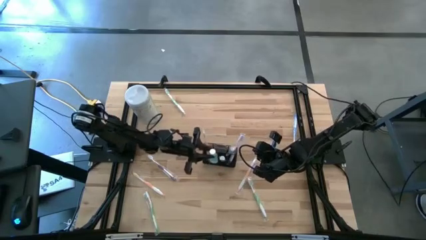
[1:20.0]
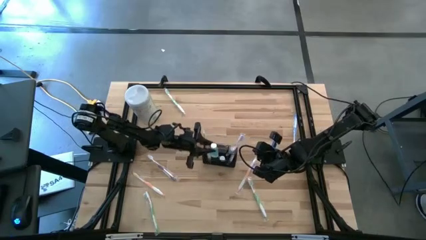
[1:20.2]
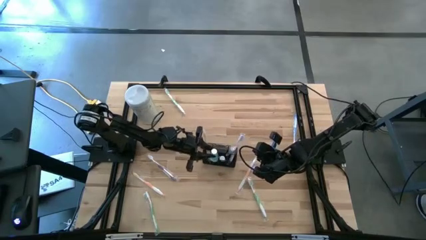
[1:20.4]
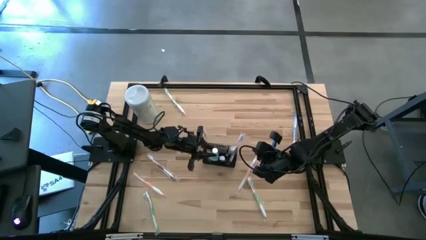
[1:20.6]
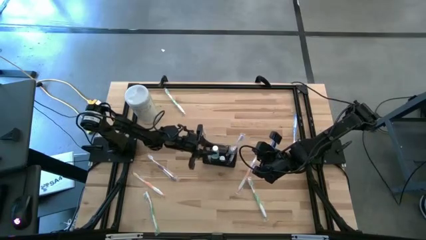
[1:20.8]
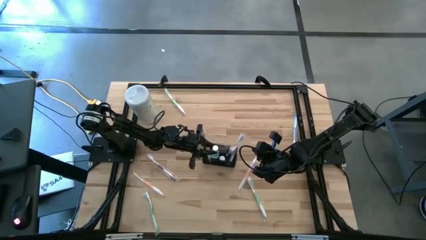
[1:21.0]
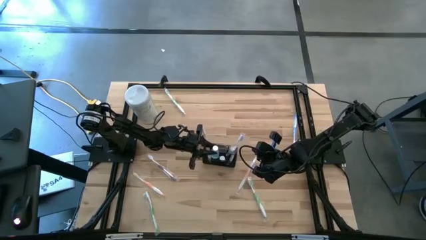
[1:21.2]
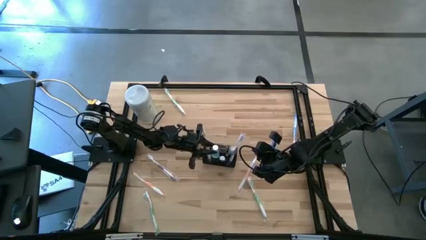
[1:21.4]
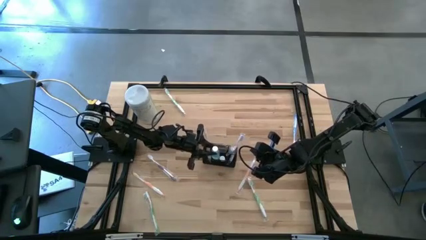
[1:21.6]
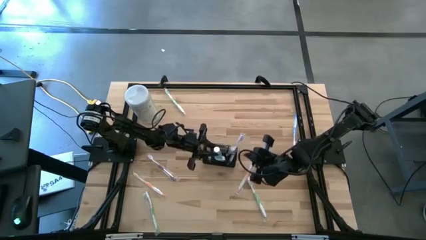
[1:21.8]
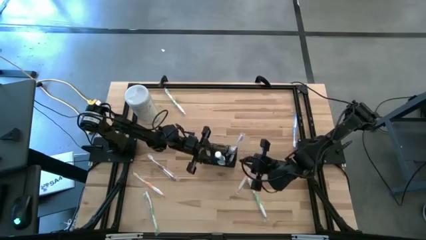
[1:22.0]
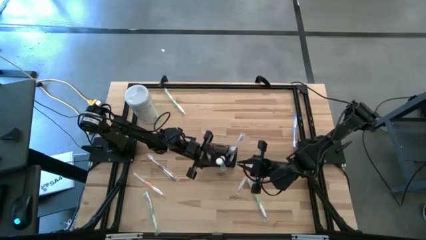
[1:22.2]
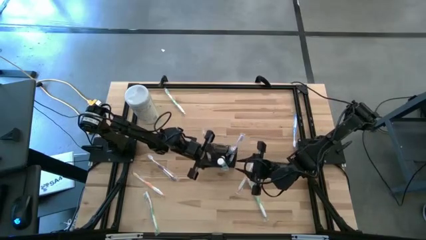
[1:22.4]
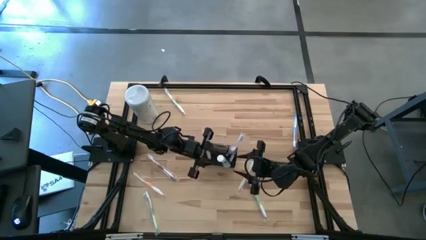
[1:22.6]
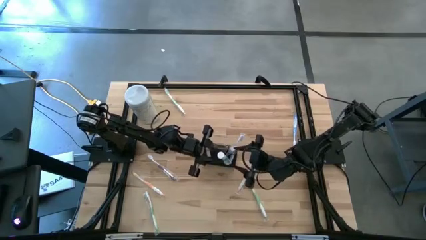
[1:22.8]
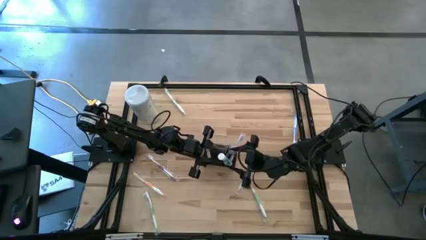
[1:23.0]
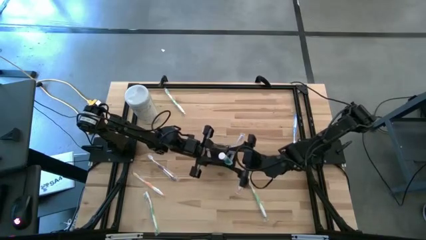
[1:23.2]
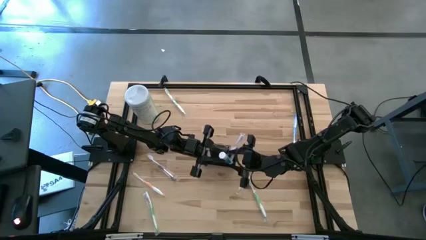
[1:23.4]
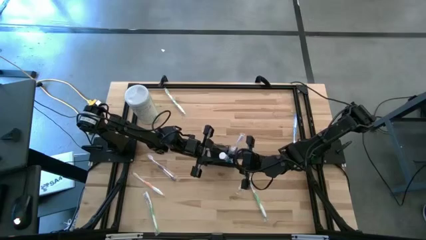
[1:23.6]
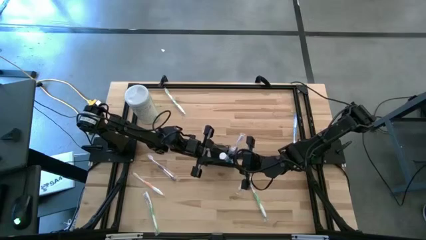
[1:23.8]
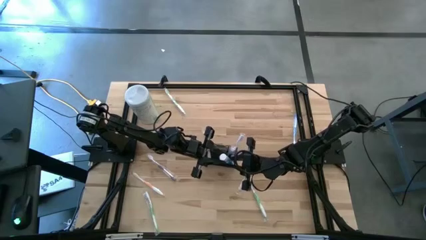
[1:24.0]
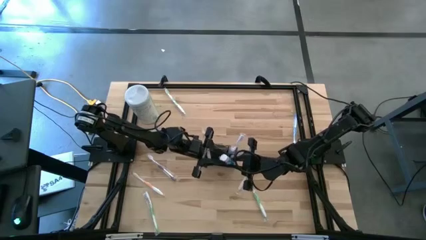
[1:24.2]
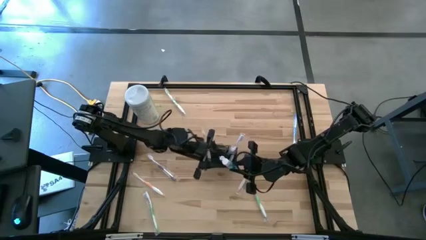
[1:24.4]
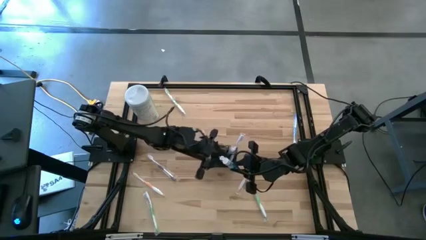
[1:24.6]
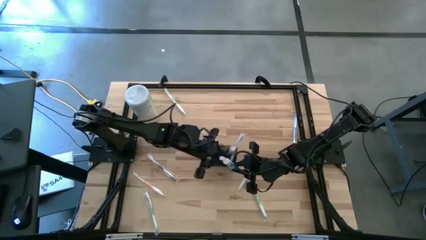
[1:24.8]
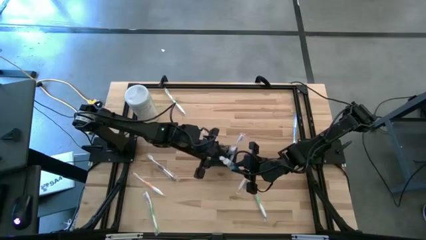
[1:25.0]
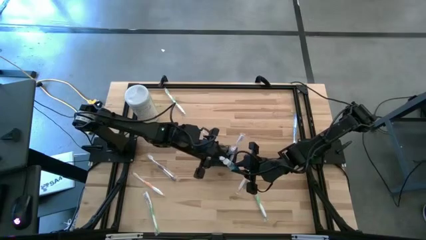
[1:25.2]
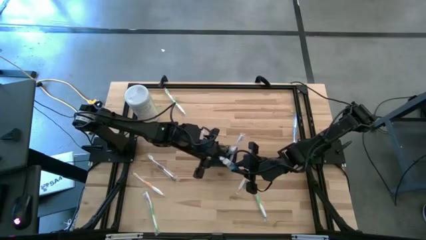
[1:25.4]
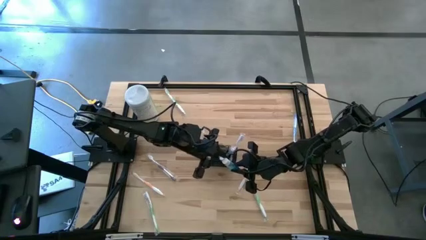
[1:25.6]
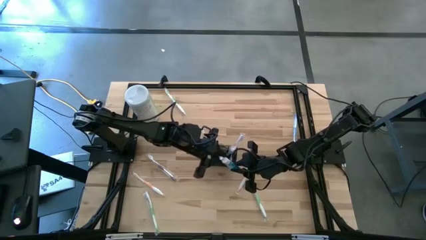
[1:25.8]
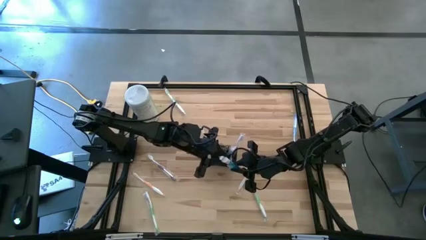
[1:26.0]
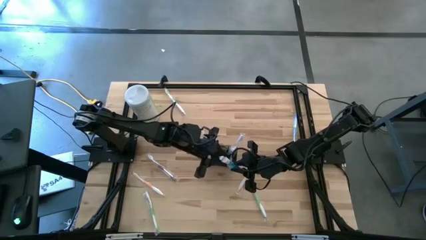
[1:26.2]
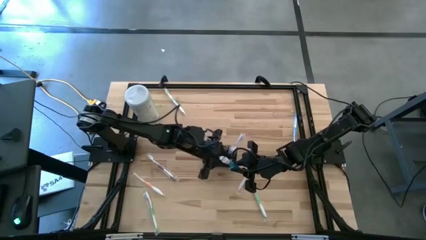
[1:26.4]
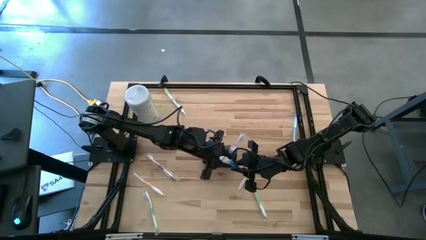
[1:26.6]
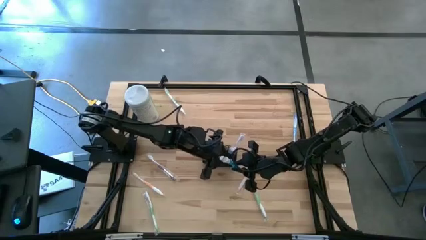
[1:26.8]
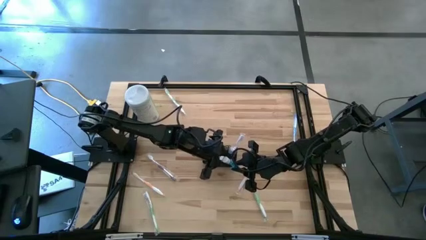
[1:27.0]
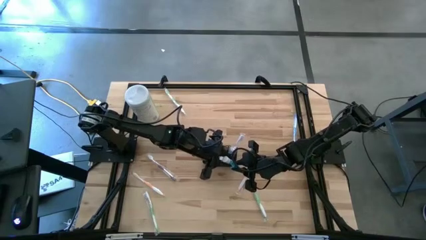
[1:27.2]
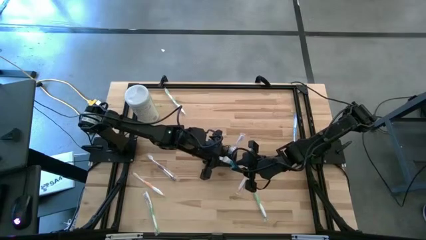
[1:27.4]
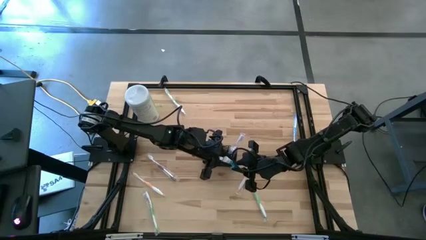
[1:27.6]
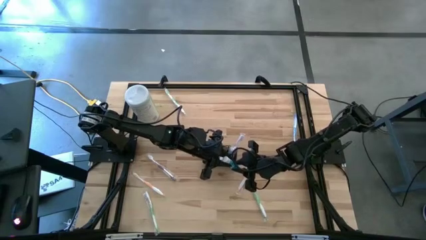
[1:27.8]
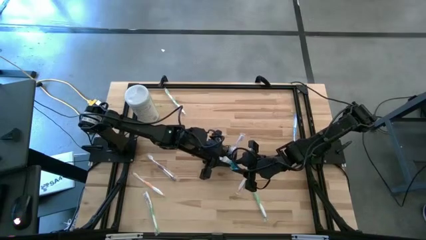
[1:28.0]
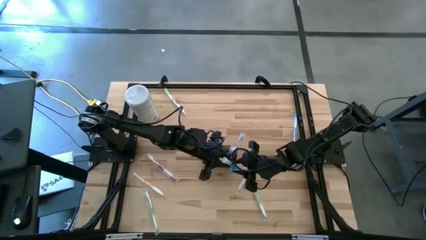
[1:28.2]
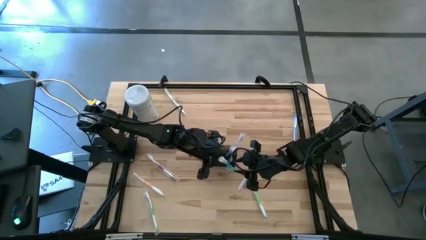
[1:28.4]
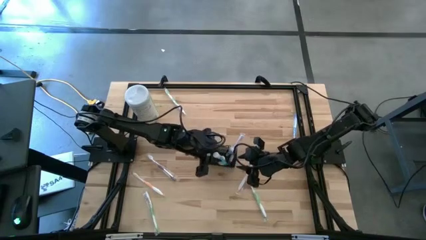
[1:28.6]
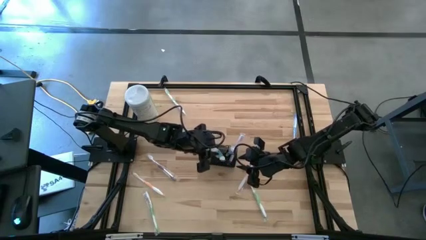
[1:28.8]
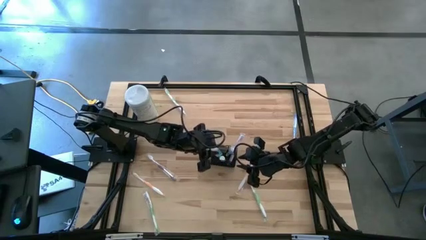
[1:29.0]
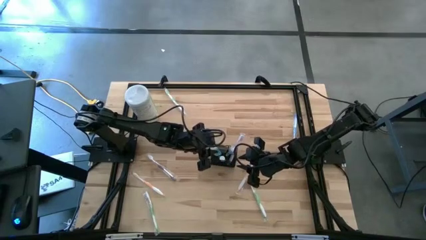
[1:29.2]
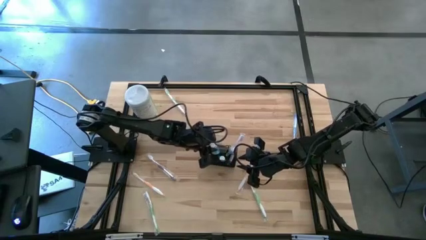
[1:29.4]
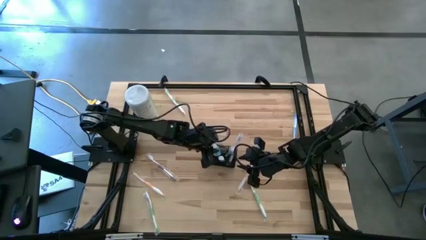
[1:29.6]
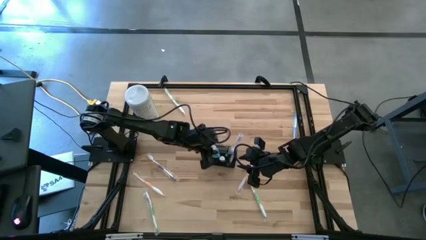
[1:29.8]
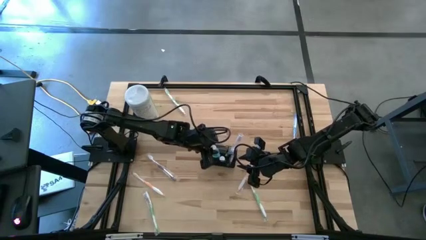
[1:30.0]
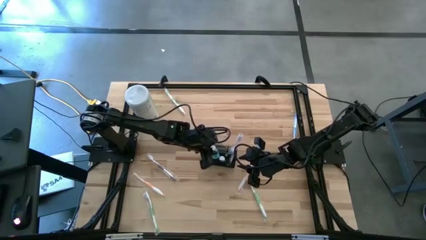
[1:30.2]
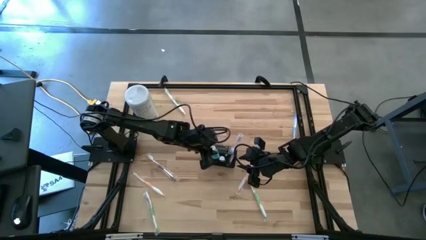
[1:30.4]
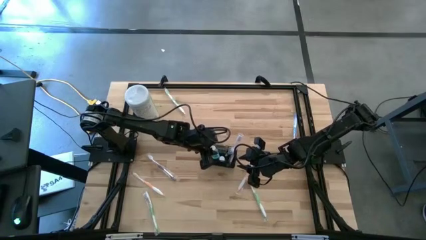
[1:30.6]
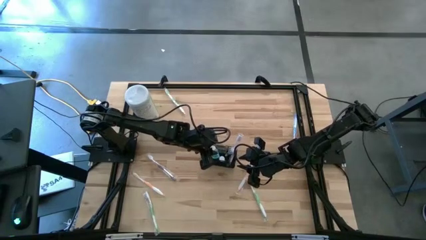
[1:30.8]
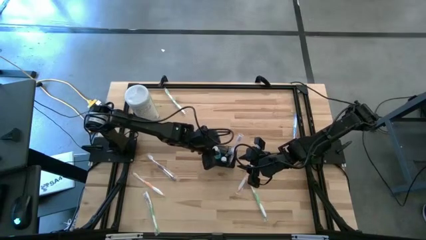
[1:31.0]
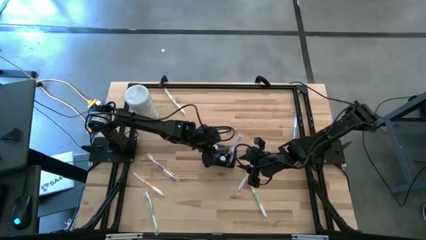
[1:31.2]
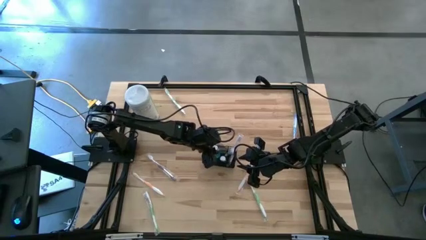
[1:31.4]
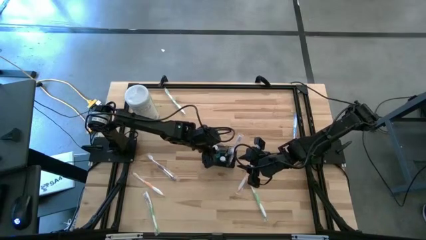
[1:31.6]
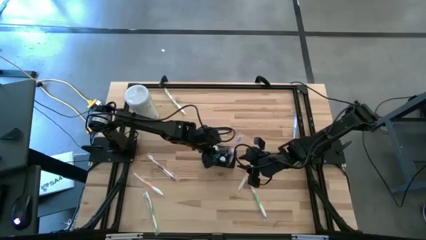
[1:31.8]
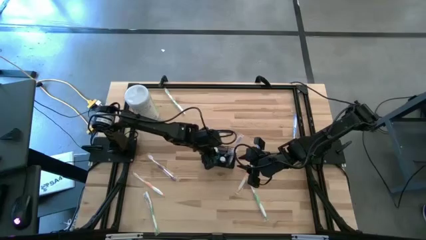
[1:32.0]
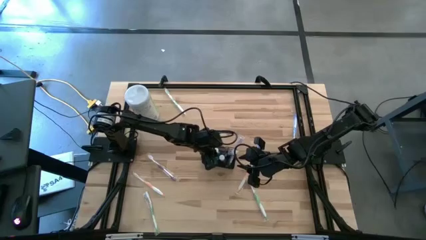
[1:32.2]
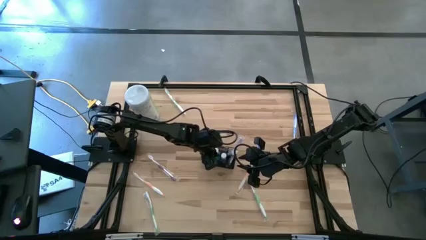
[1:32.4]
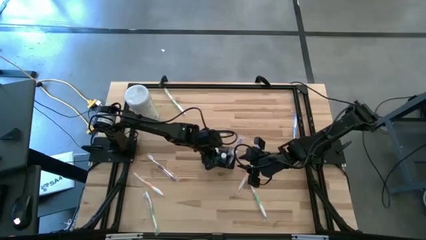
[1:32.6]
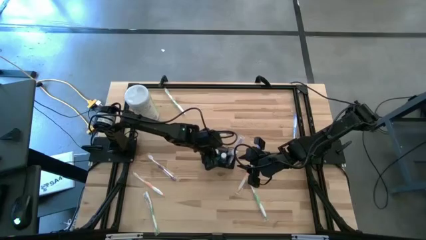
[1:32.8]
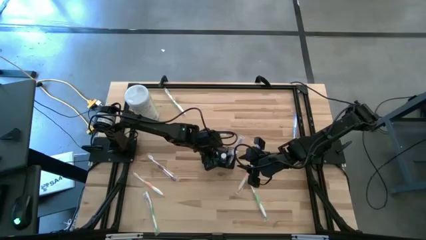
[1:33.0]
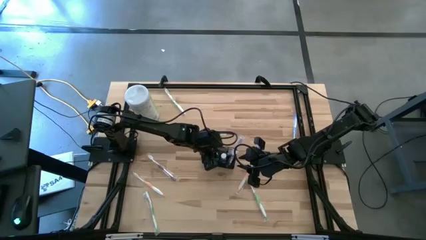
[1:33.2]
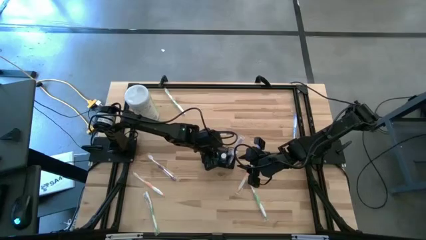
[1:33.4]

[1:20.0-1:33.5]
Task: Pick & Place toothbrushing station
Put the blue mouthwash bottle into the mesh organizer
